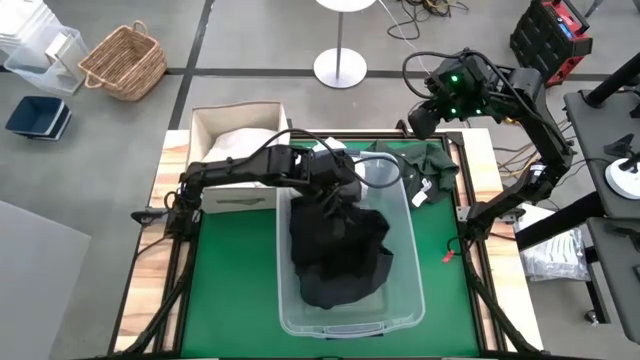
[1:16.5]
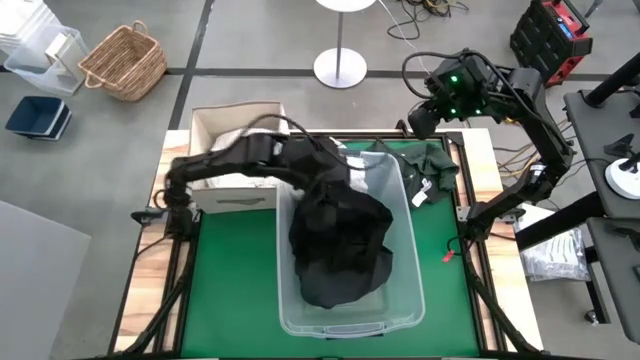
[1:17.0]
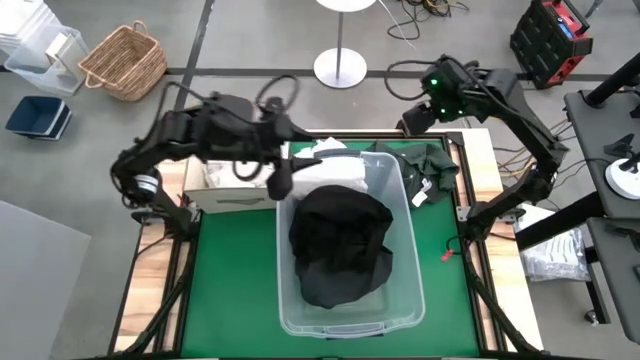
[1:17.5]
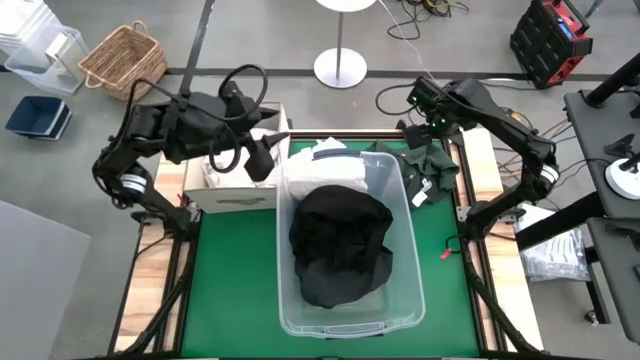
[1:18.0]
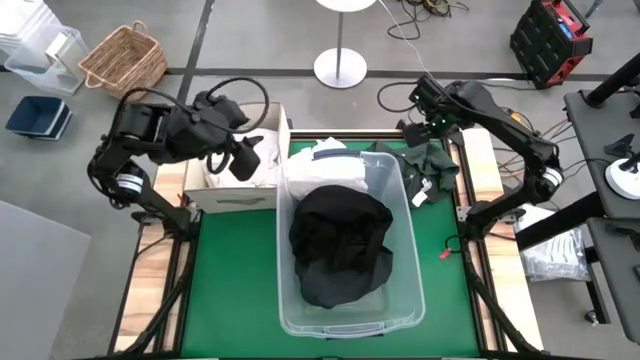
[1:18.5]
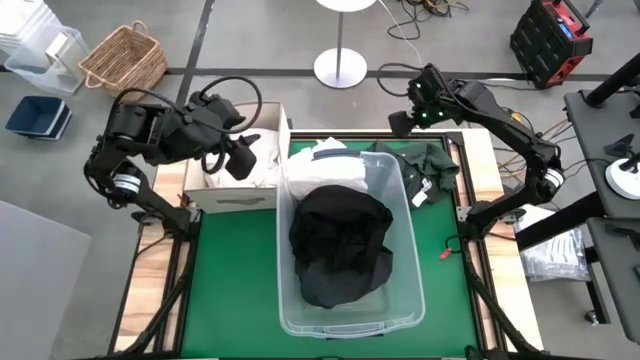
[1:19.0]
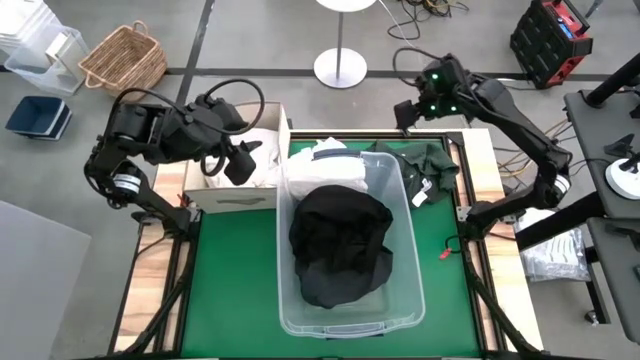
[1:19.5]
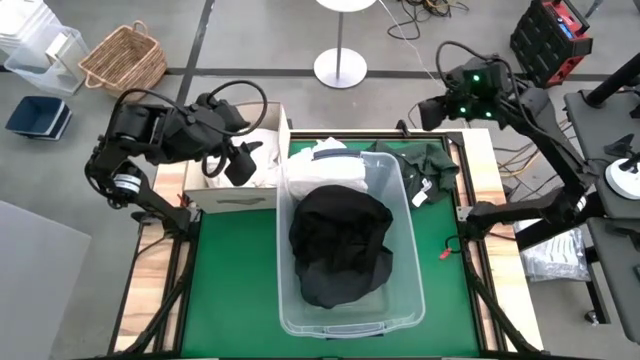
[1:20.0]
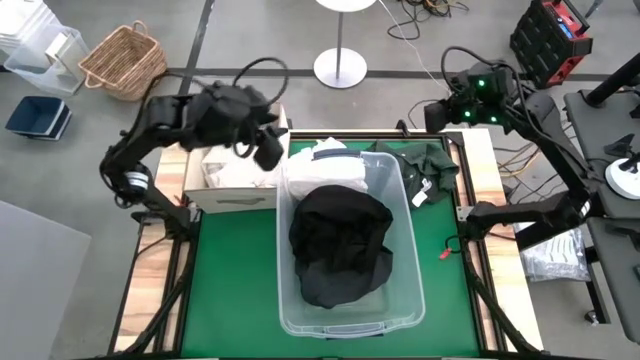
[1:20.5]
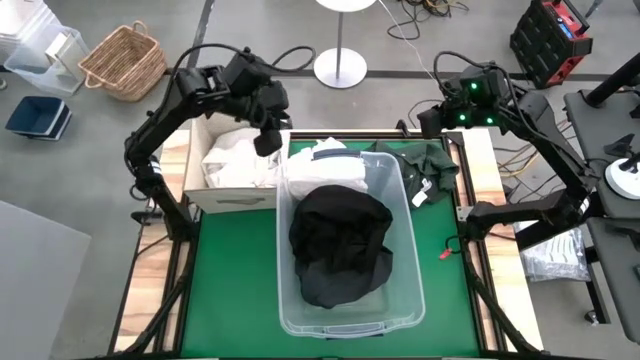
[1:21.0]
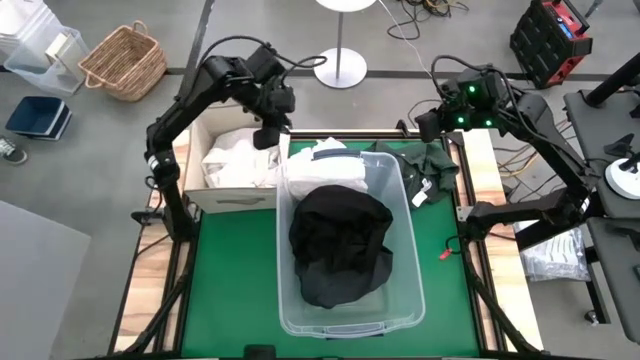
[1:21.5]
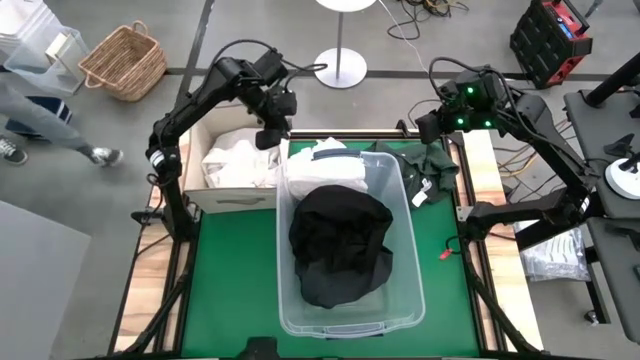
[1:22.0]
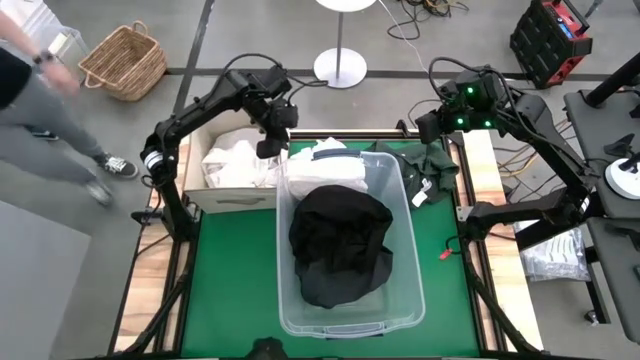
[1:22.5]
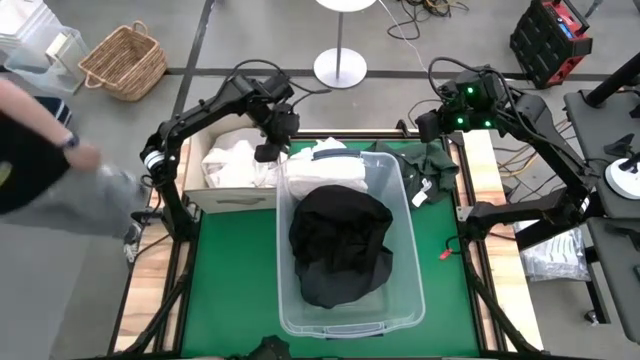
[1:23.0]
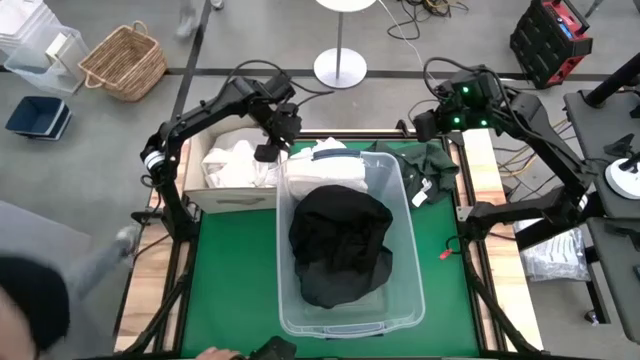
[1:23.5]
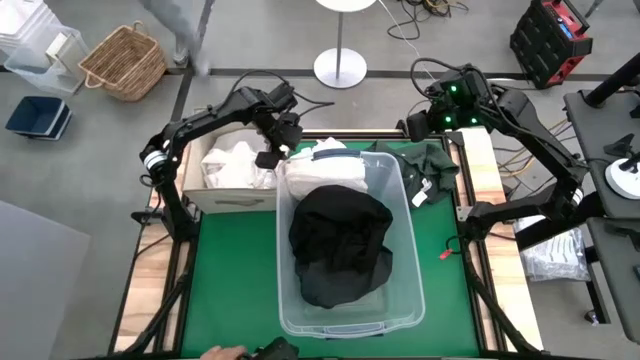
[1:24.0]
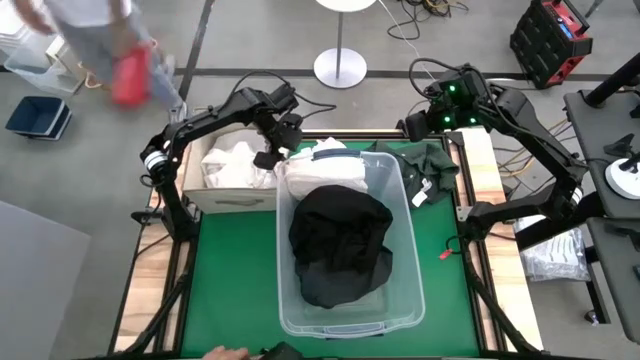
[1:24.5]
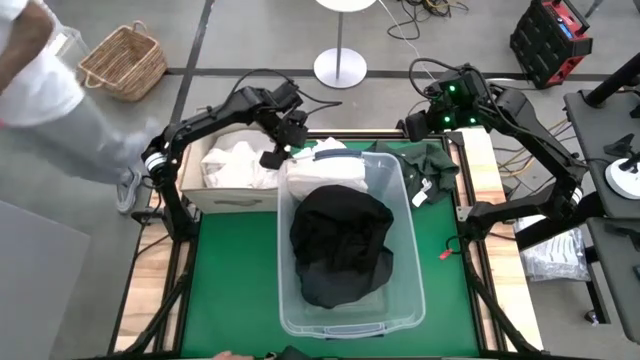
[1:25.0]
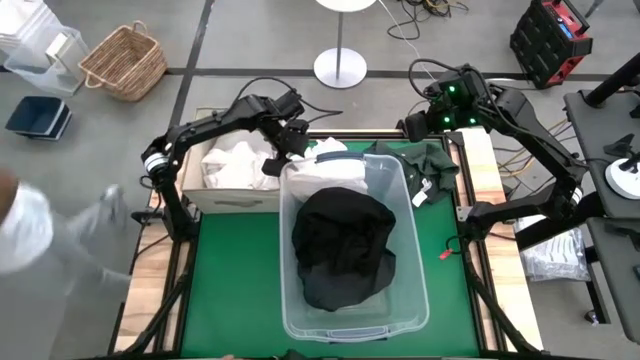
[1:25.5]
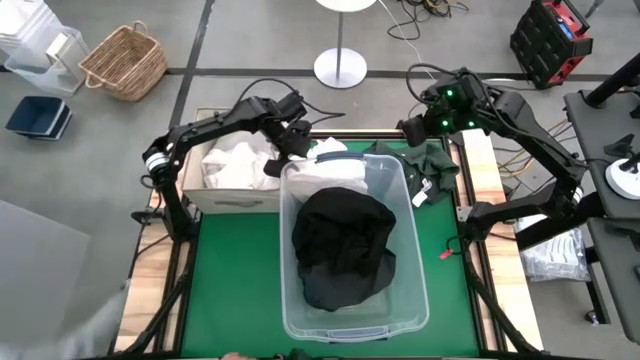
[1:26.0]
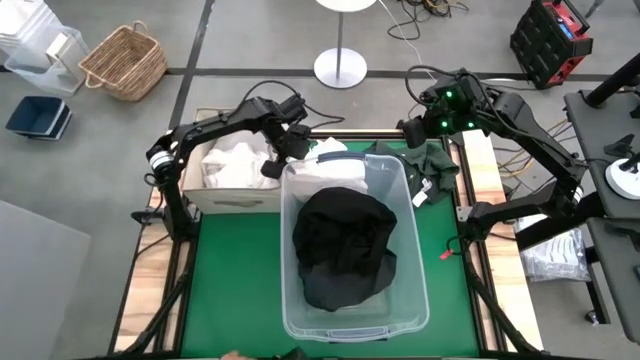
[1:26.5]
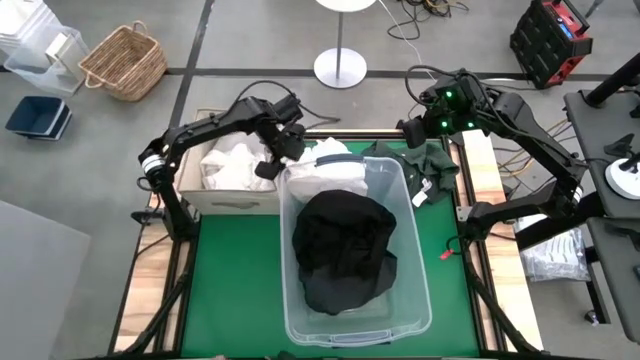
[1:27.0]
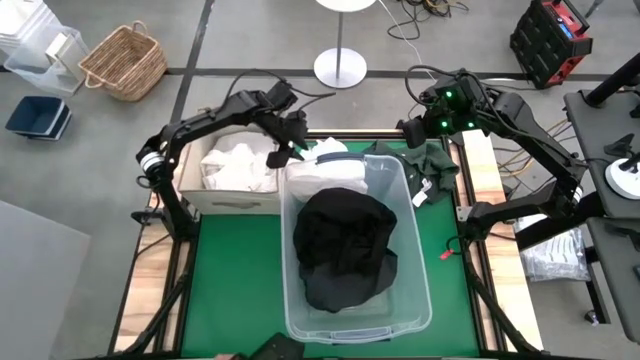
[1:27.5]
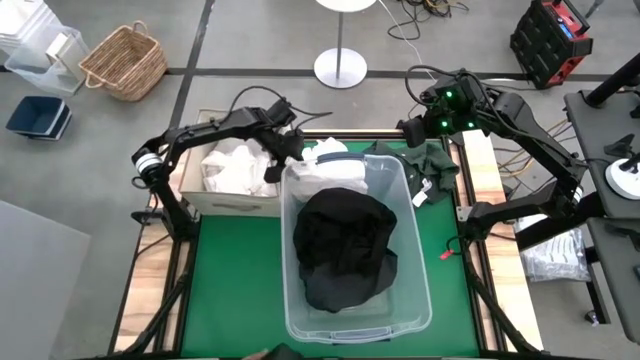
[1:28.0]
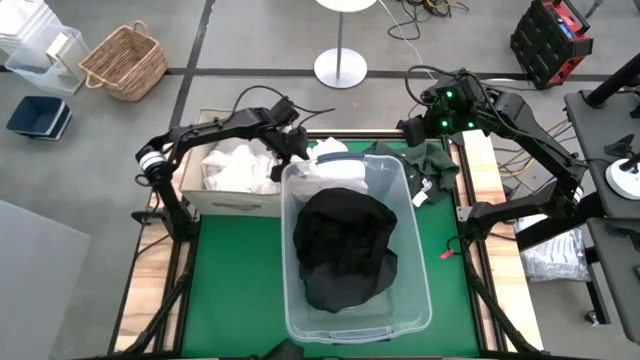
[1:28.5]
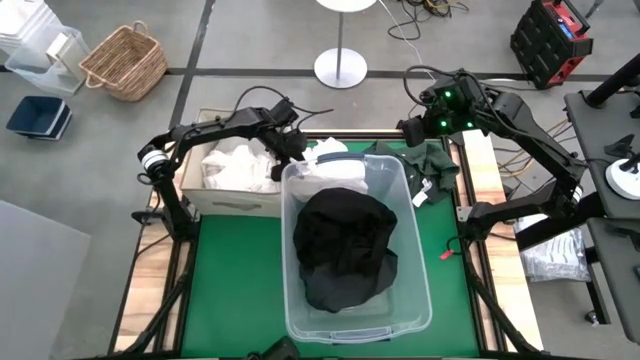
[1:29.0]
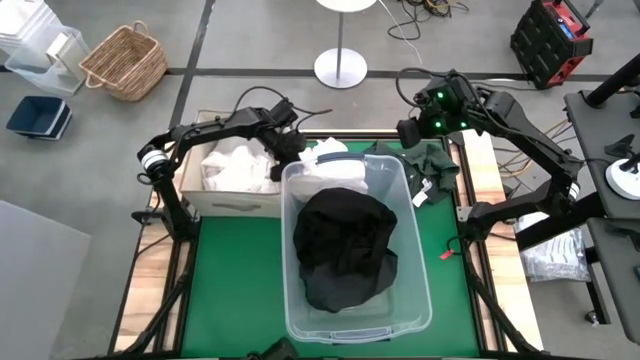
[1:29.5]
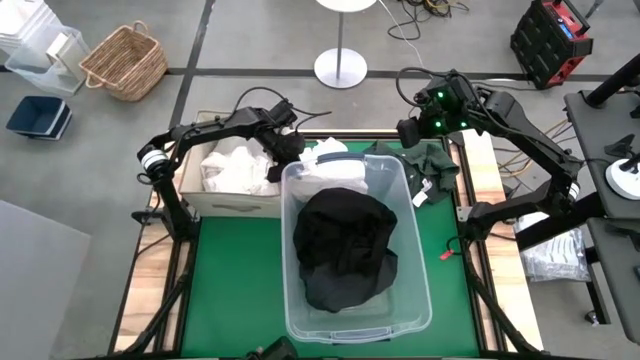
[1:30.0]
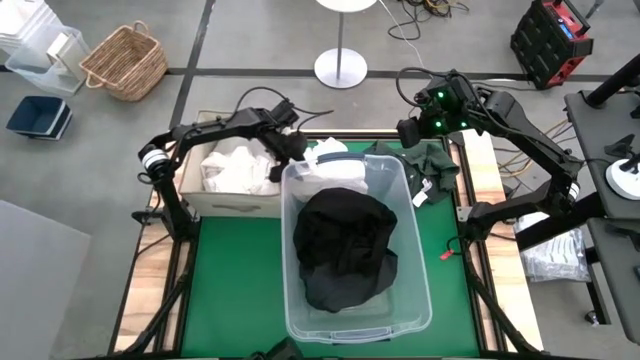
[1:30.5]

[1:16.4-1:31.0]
Task: Sort clothes
Put the white dress into the white laundry organizer

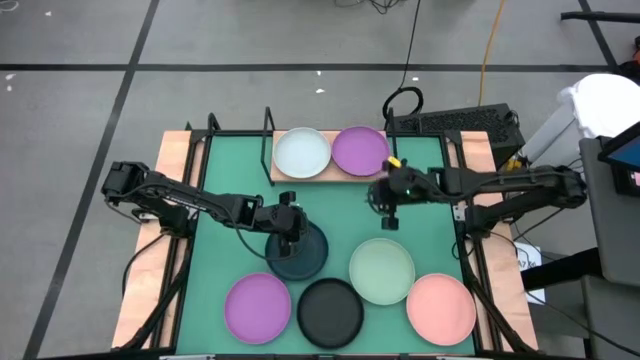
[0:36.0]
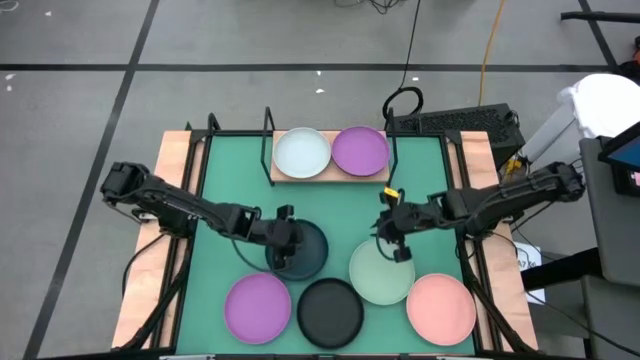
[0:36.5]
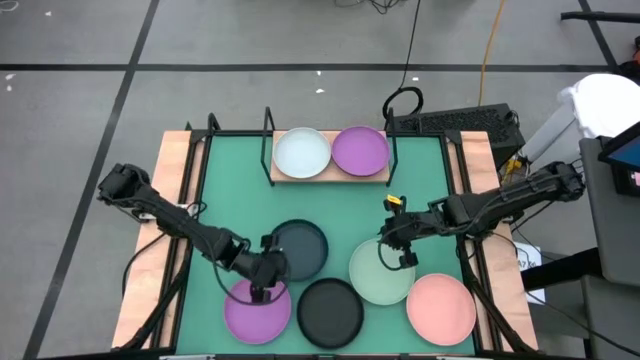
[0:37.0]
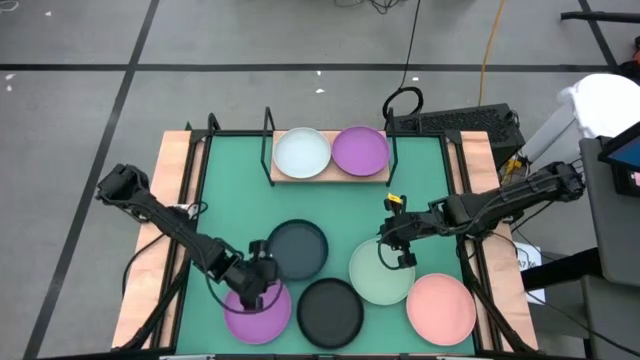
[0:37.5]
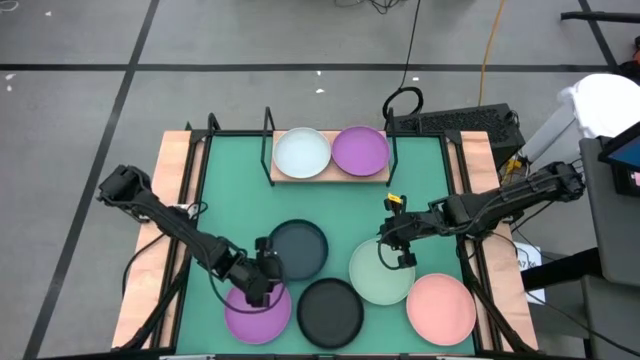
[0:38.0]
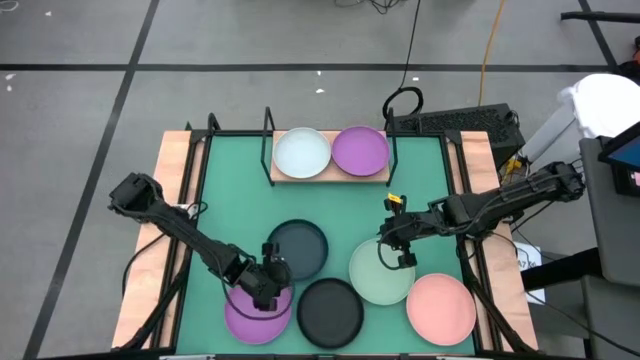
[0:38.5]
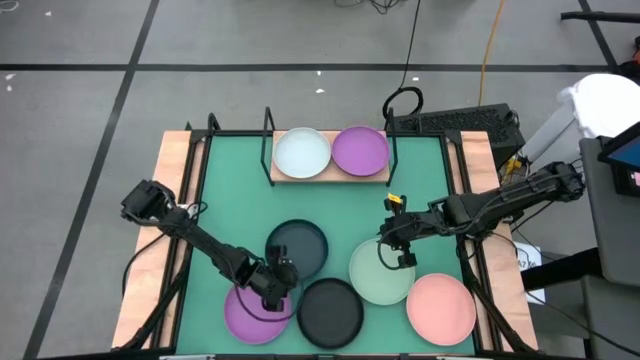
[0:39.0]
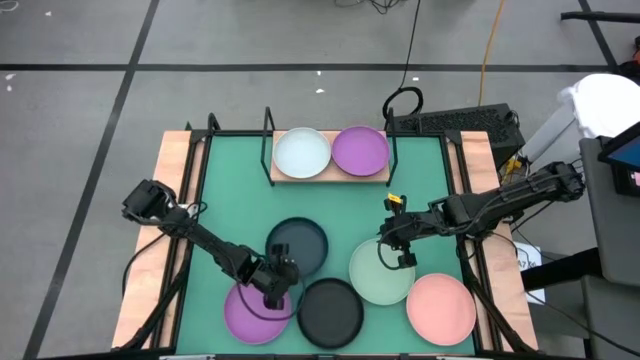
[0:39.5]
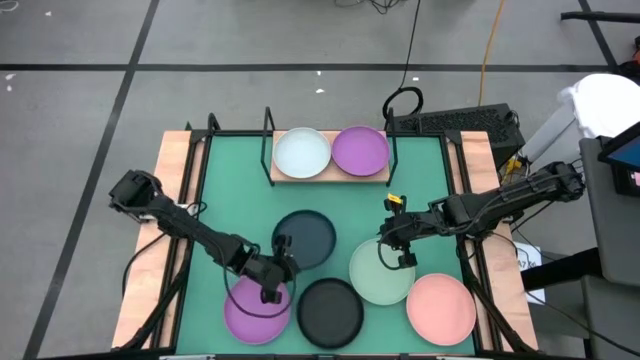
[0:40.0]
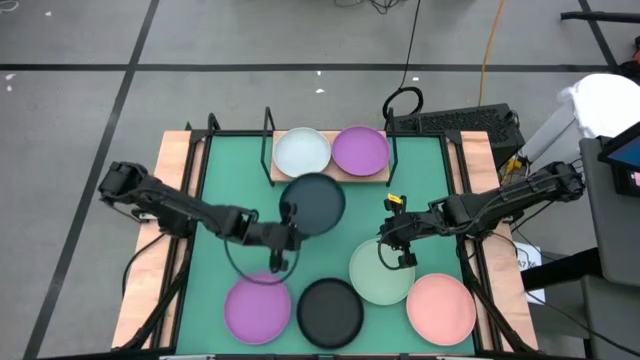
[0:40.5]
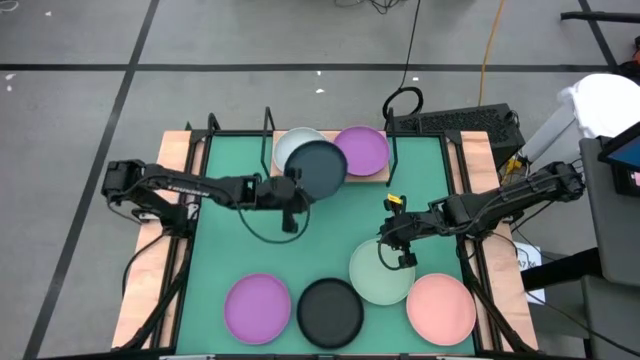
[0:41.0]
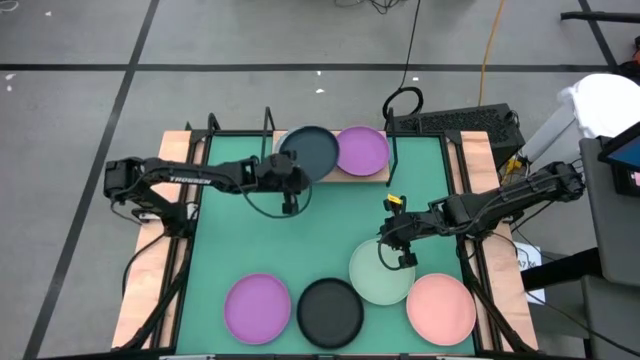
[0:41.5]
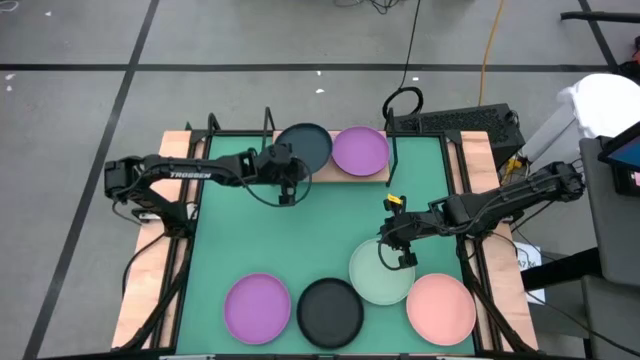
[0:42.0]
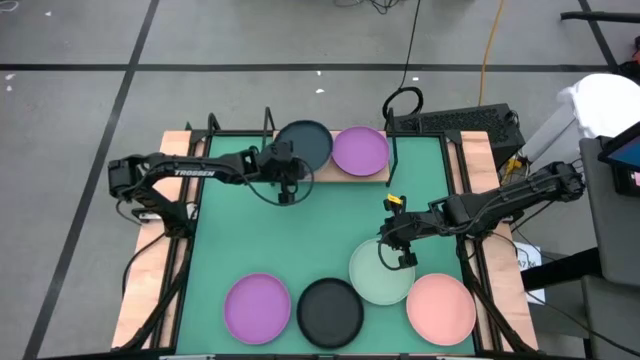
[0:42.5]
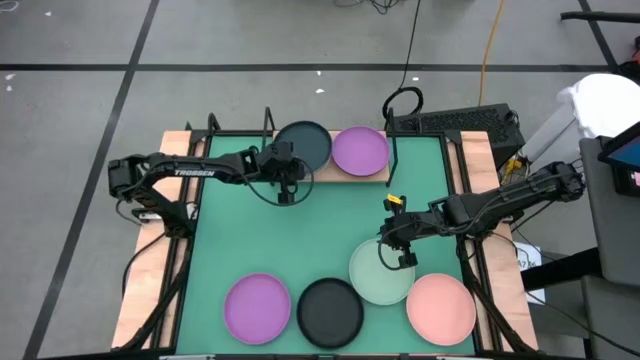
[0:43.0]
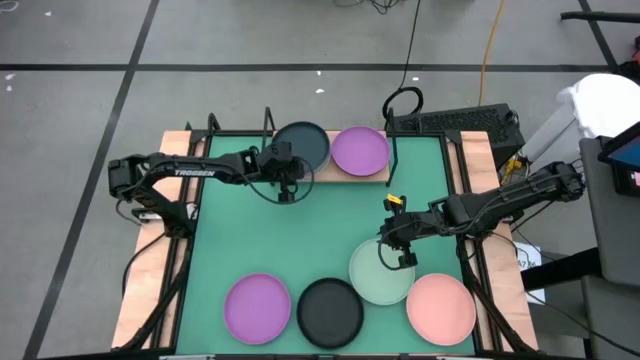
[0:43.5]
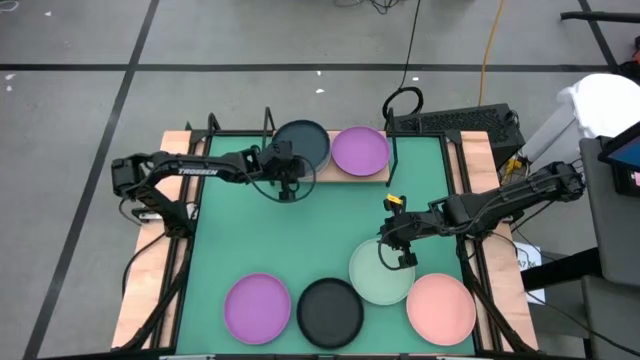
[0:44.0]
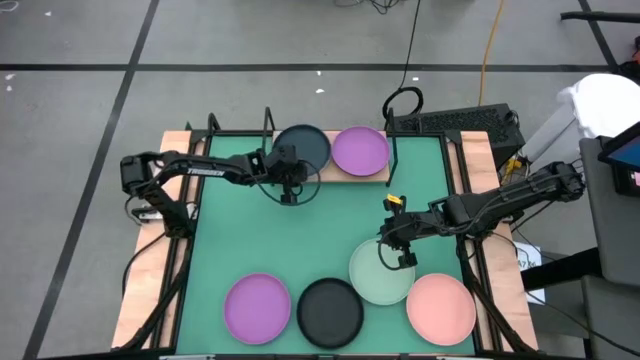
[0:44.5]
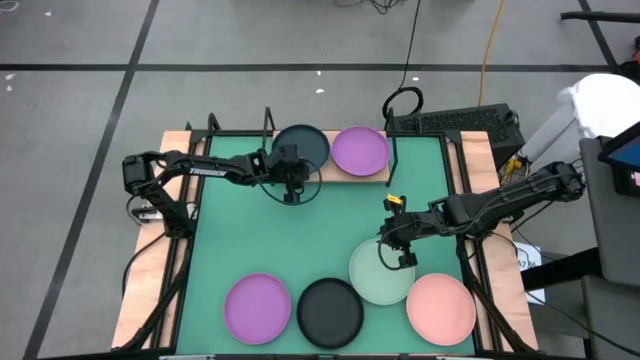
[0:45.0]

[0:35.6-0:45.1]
Task: Place and stack plates onto a shelf
Stack the dark blue plate on top of the white plate on the shelf
